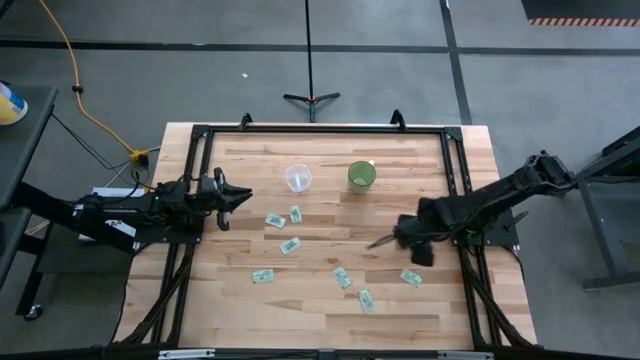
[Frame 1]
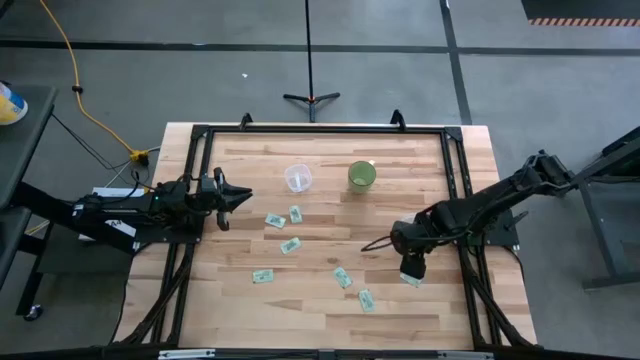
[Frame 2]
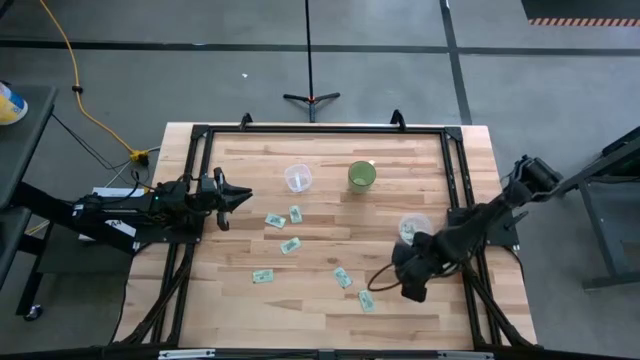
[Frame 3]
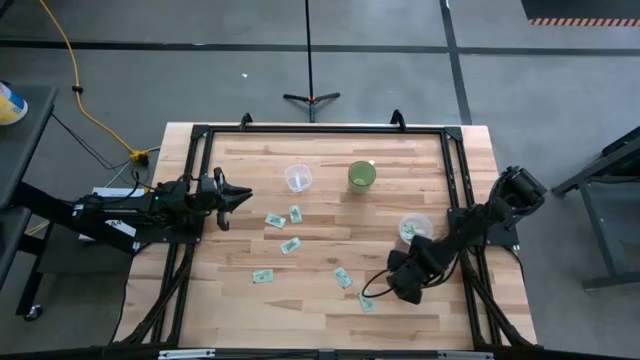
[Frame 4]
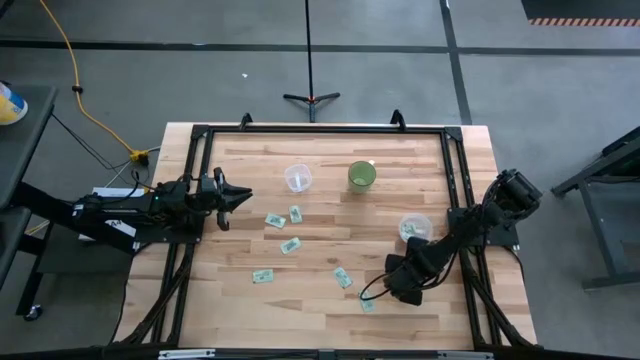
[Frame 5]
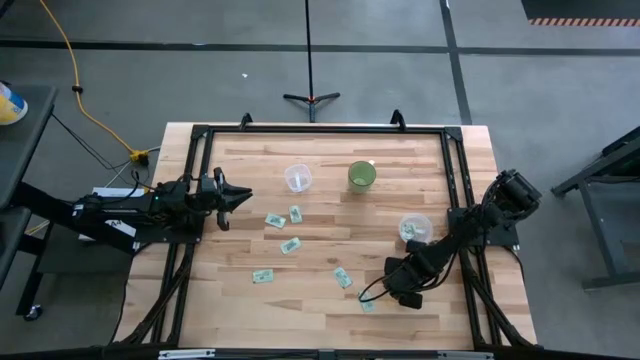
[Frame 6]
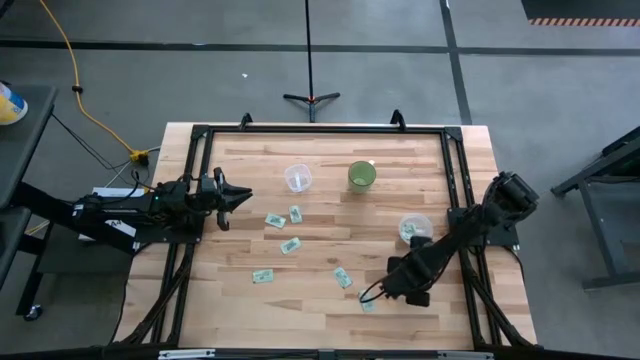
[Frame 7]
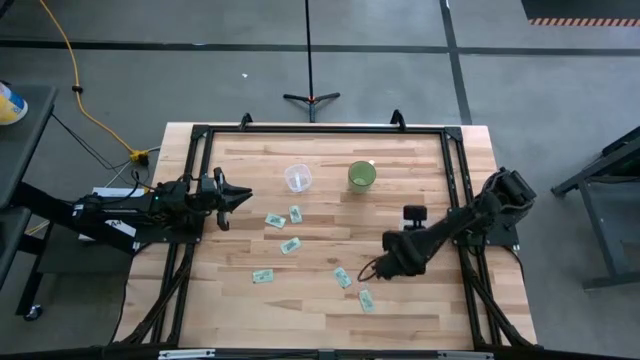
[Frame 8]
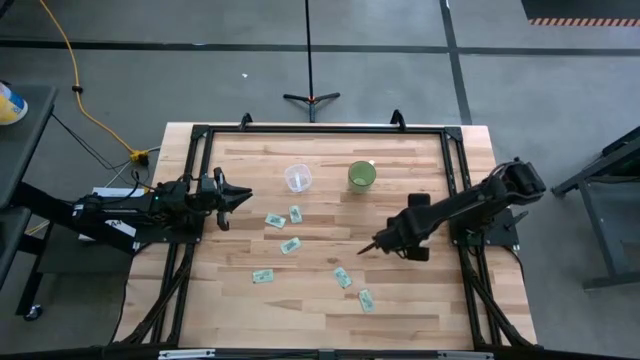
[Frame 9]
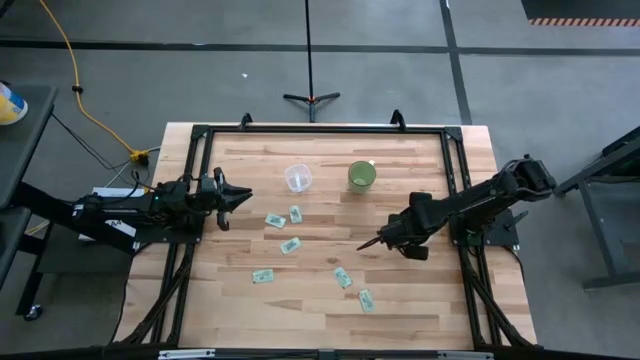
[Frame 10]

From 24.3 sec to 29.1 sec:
Task: Pick and place items into bin
Put the white sweetener packet into the right transparent bin

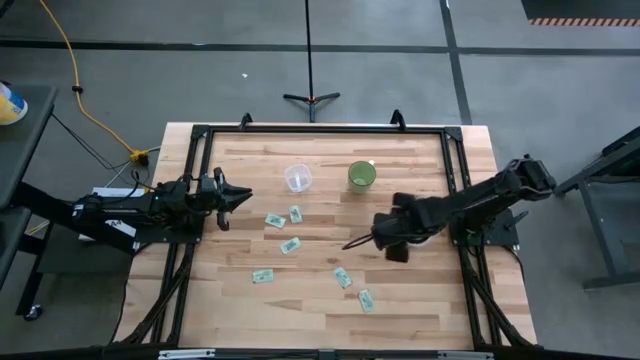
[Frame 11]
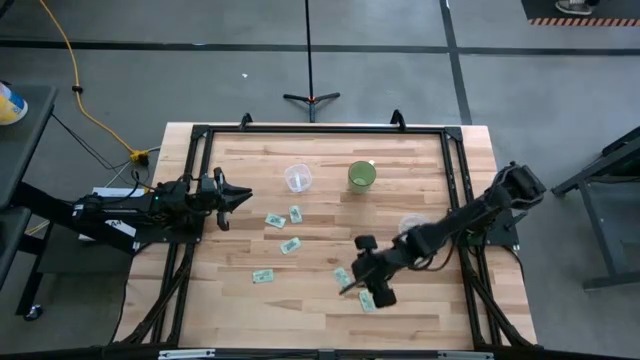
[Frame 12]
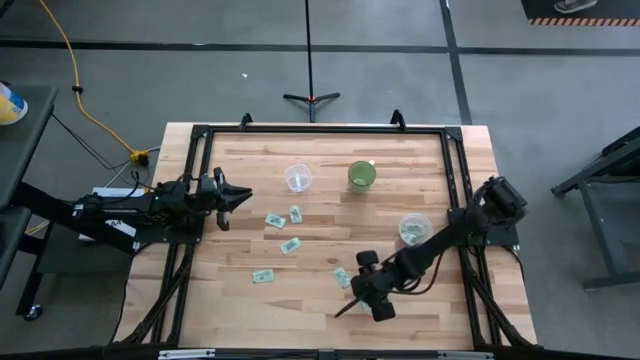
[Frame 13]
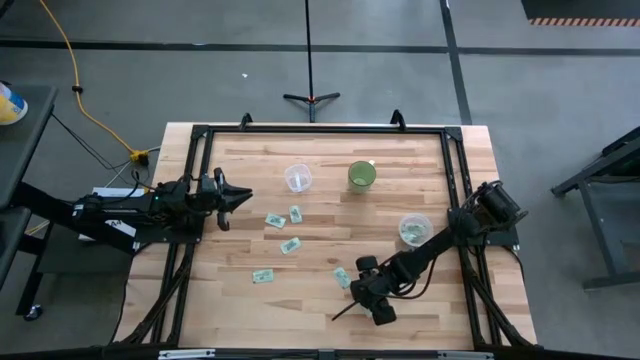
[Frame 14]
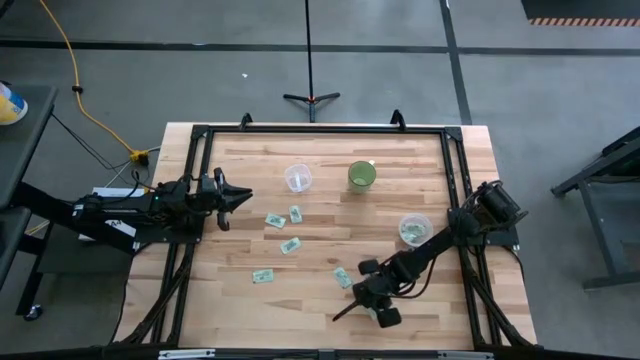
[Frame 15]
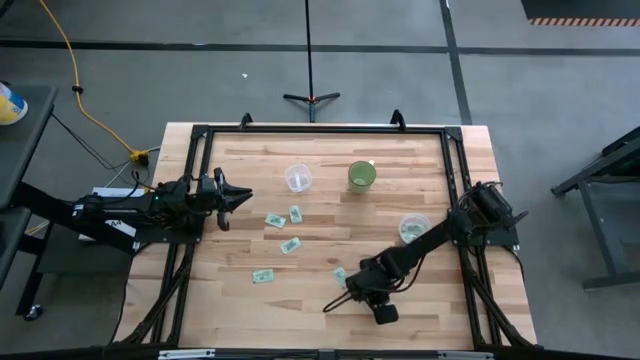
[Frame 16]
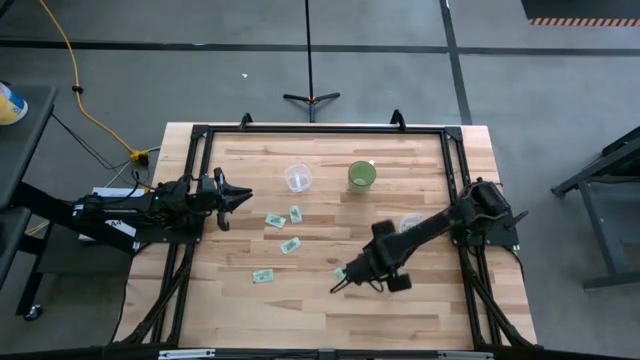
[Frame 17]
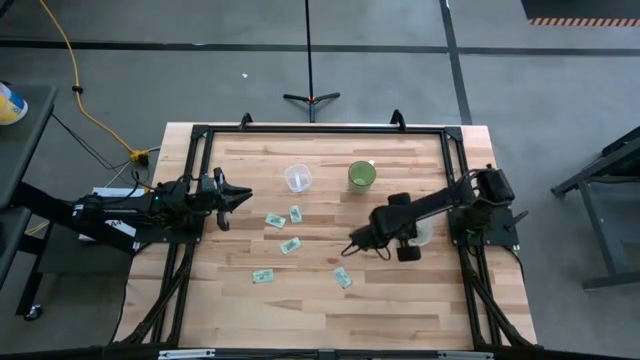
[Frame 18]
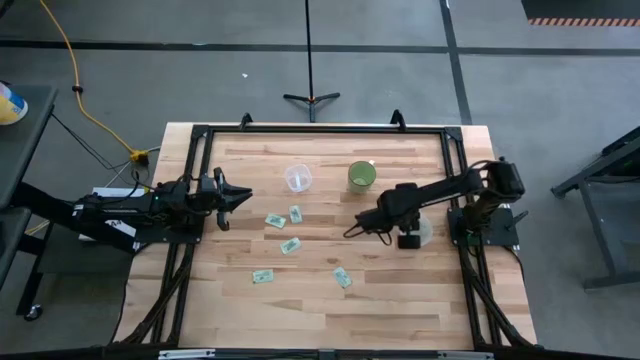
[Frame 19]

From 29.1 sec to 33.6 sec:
Put the white sweetener packet into the right transparent bin

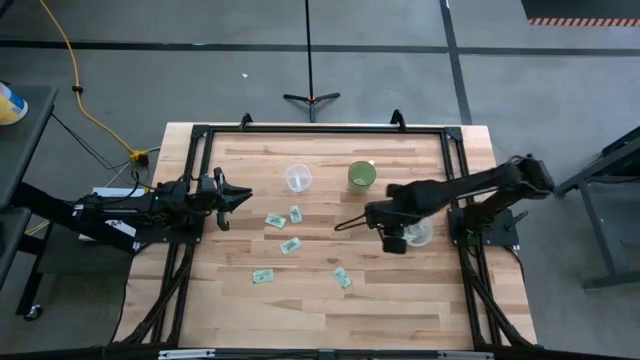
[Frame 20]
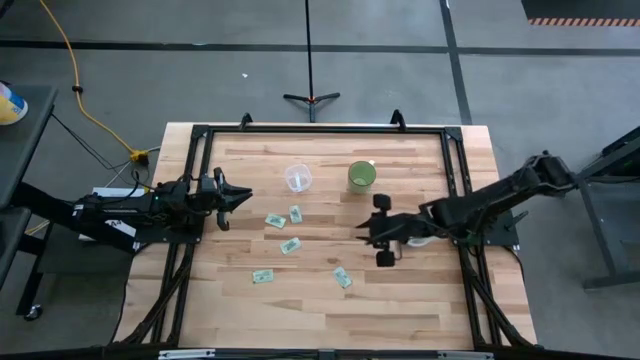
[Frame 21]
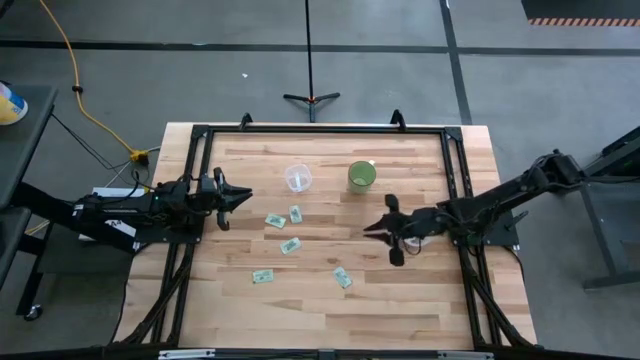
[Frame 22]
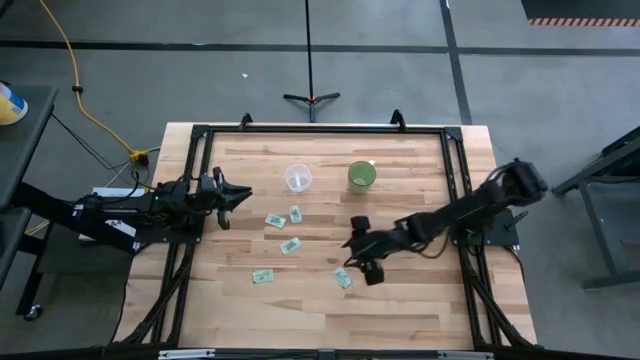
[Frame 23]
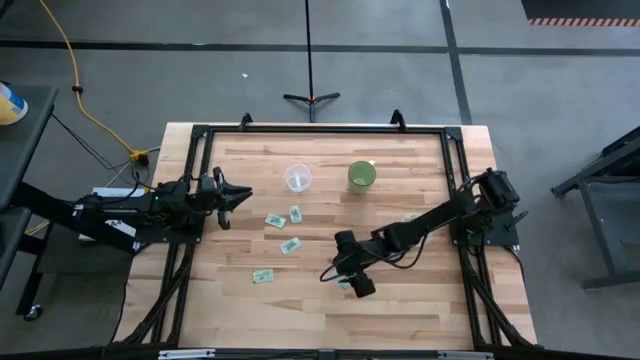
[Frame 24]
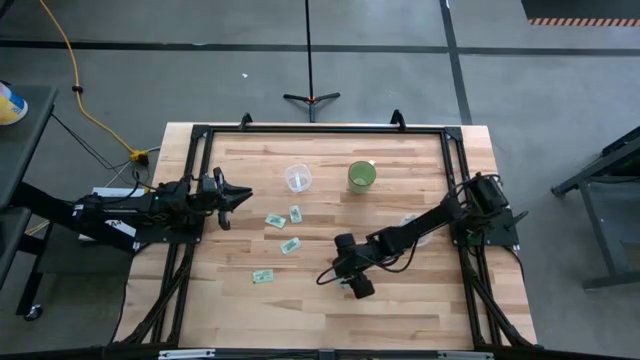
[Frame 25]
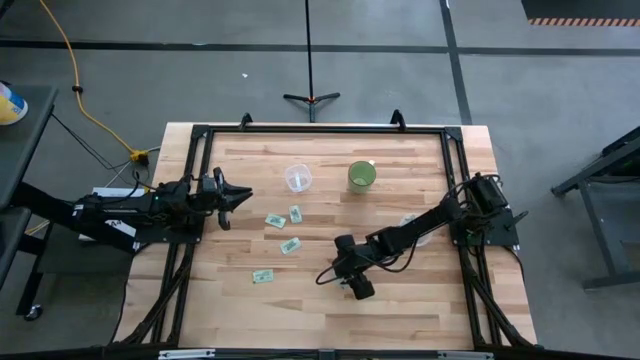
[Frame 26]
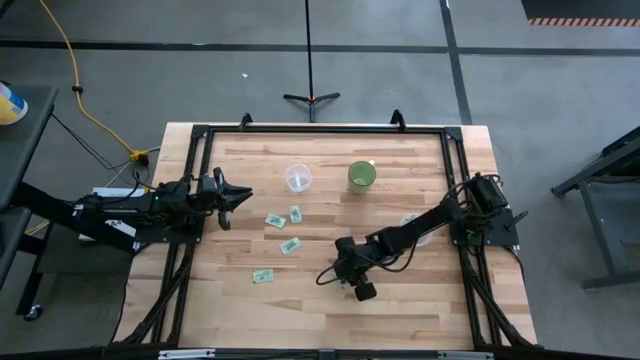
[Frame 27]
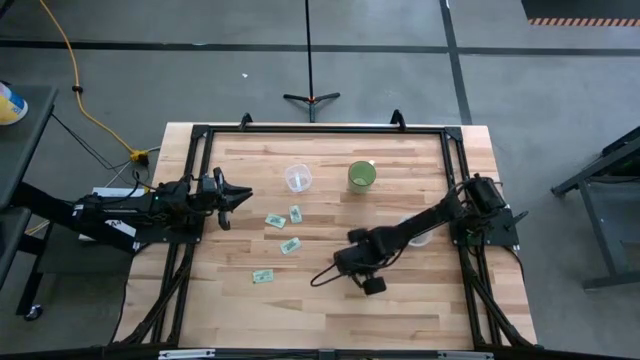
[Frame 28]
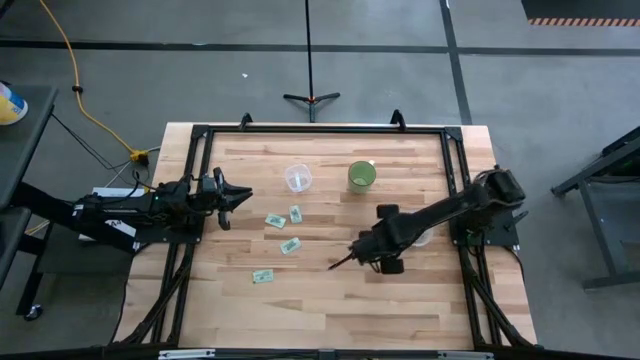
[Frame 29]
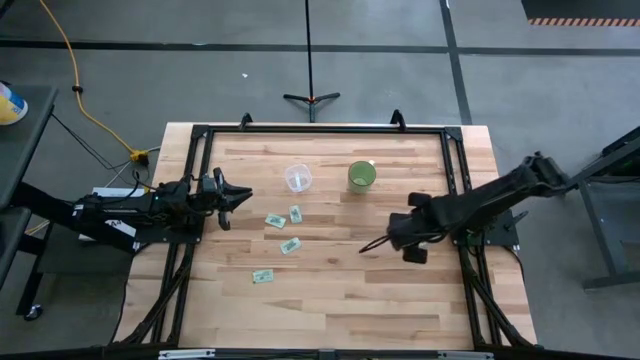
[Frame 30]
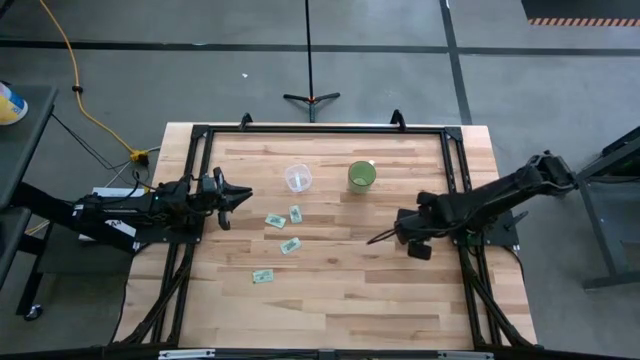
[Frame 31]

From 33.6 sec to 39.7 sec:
Put the white sweetener packet into the right transparent bin

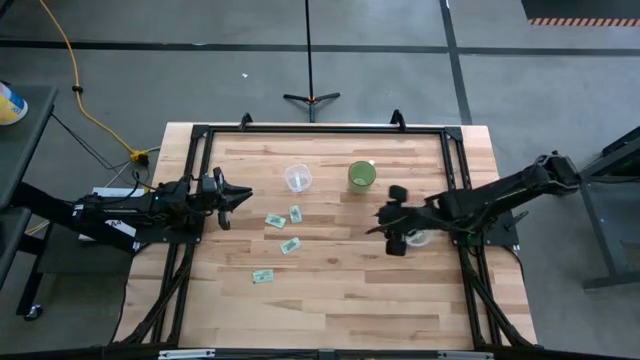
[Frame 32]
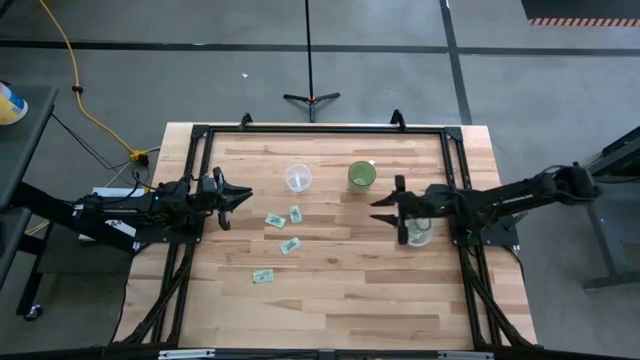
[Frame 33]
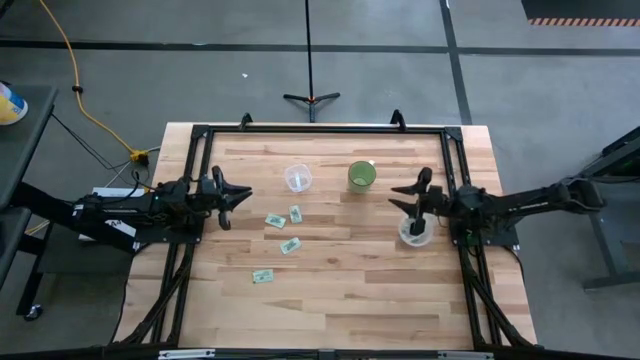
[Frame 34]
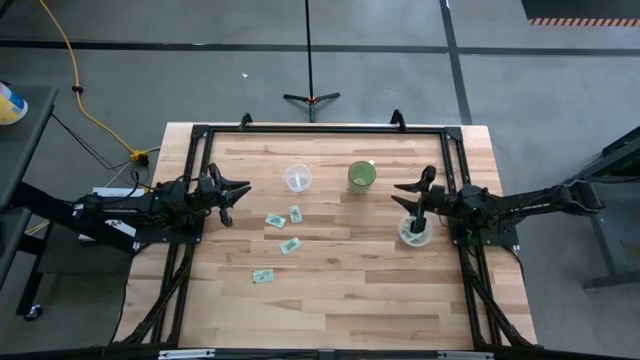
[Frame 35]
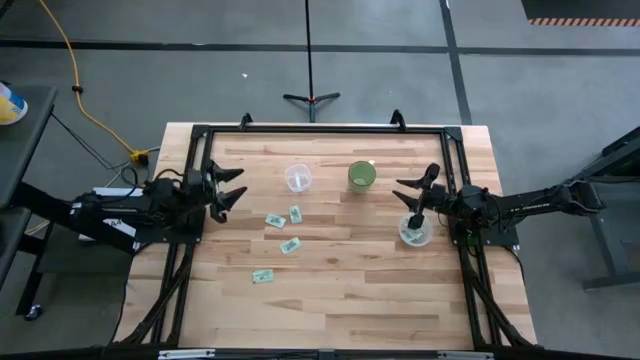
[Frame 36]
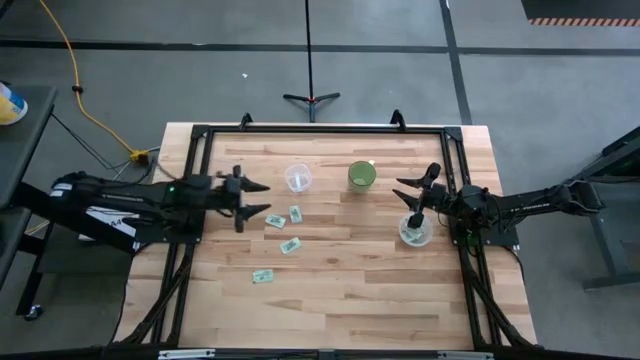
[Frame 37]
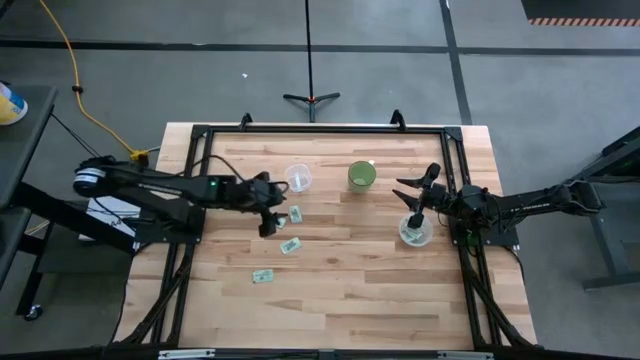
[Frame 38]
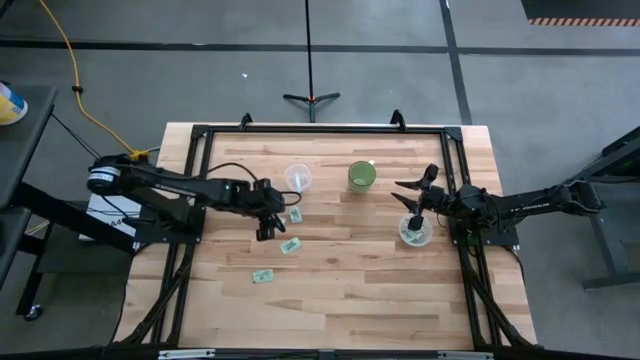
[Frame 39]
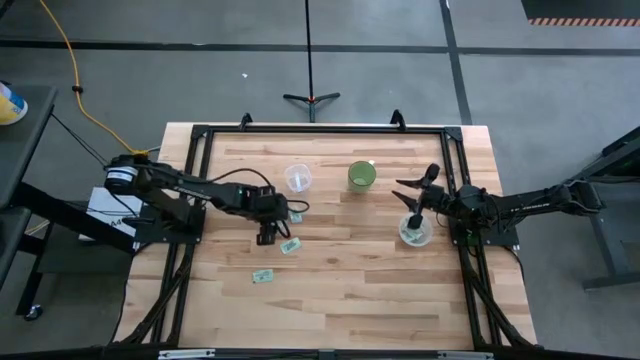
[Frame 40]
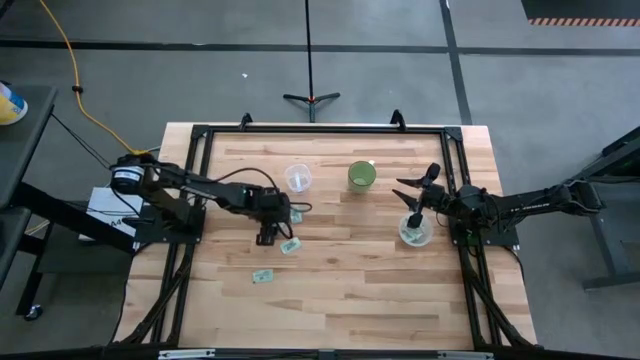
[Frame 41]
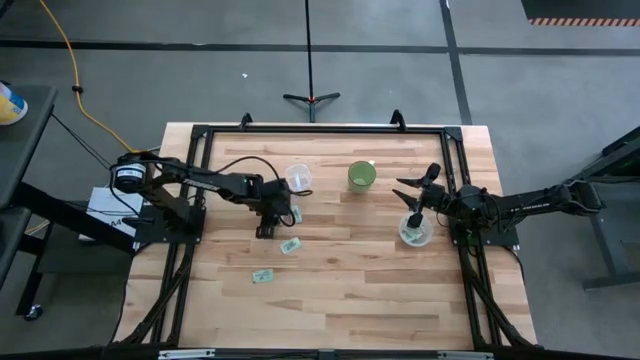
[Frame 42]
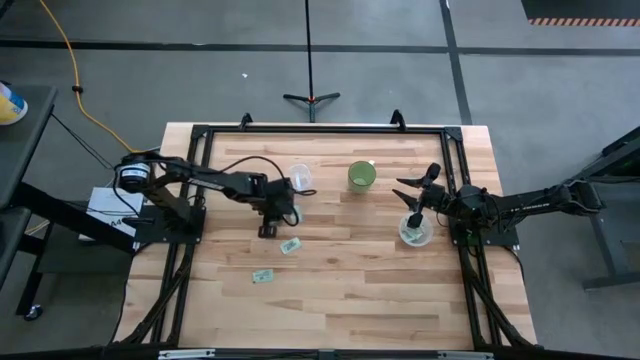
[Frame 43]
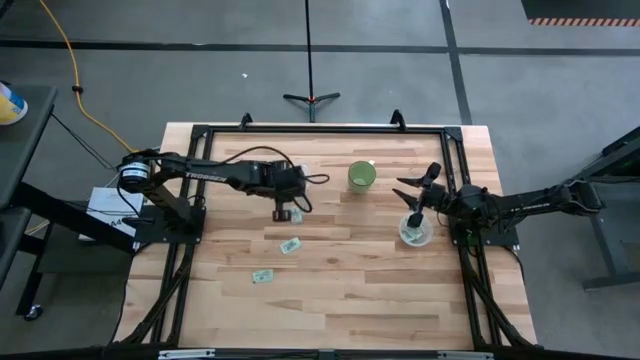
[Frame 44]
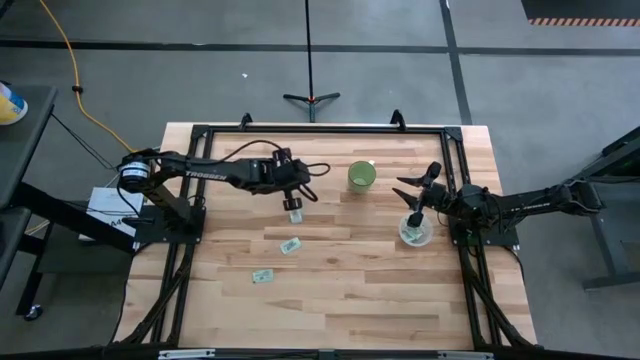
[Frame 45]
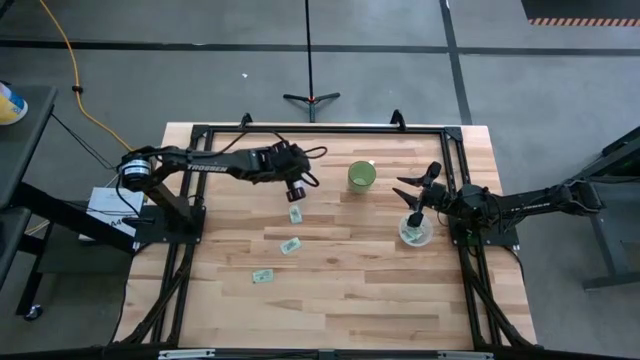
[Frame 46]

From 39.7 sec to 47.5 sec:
Put the white sweetener packet into the left transparent bin
